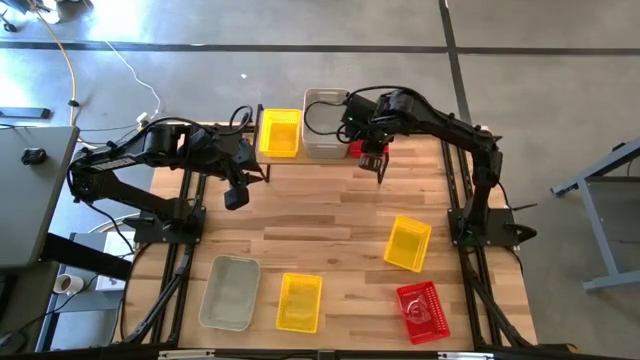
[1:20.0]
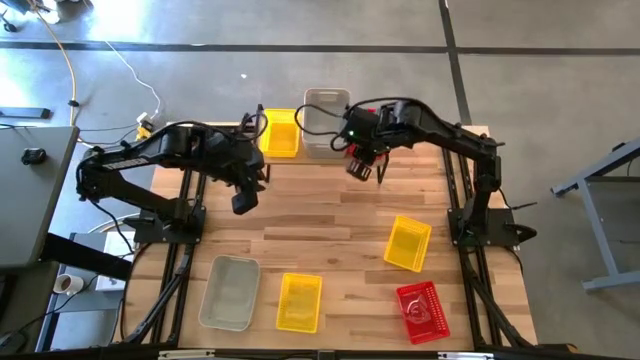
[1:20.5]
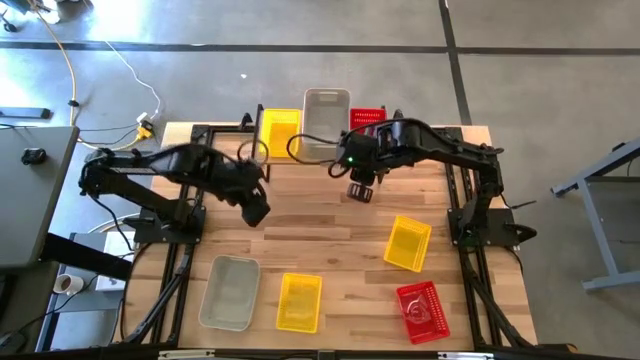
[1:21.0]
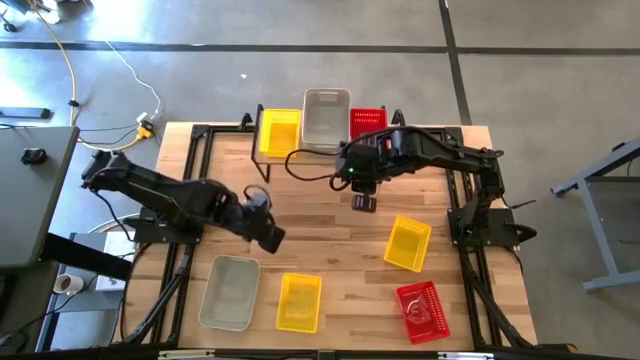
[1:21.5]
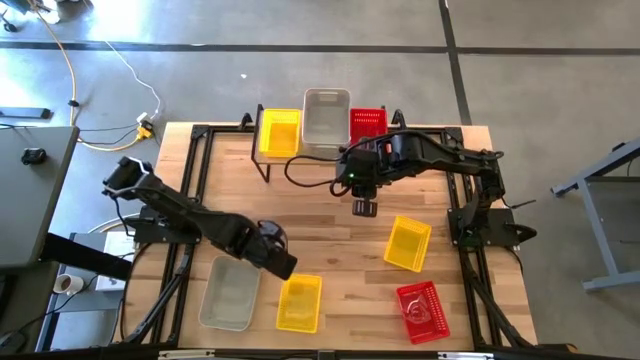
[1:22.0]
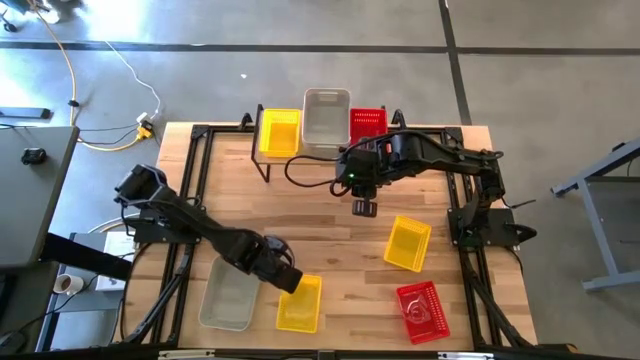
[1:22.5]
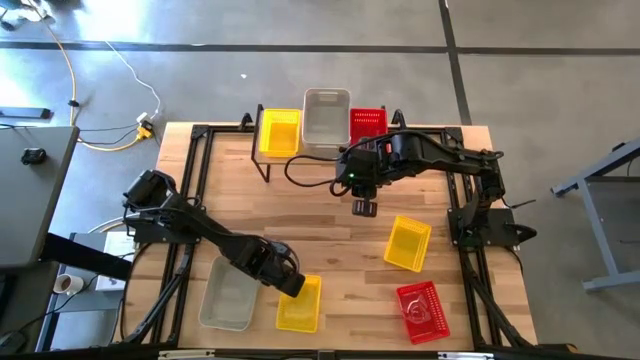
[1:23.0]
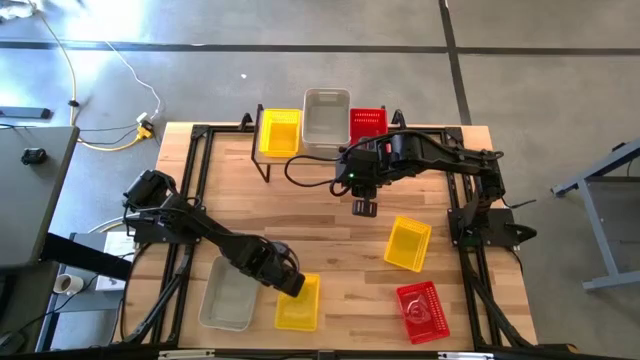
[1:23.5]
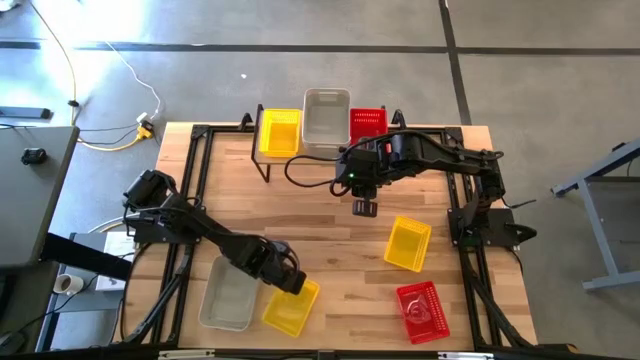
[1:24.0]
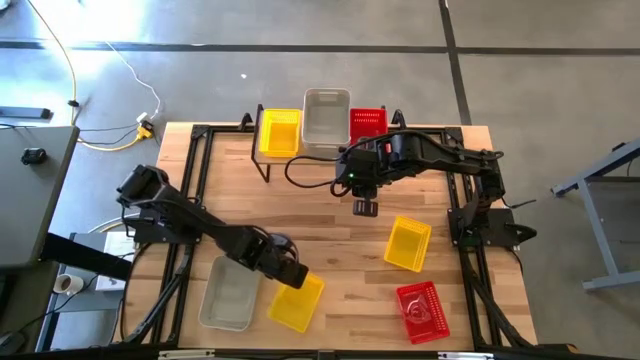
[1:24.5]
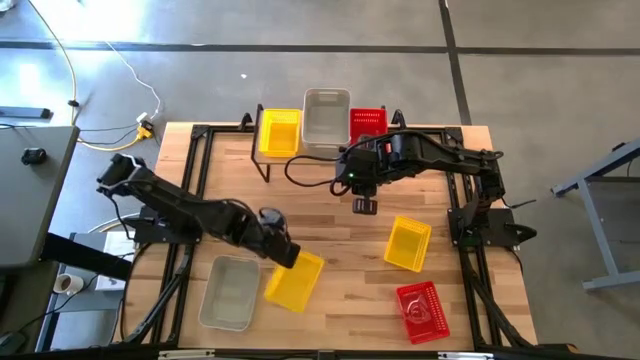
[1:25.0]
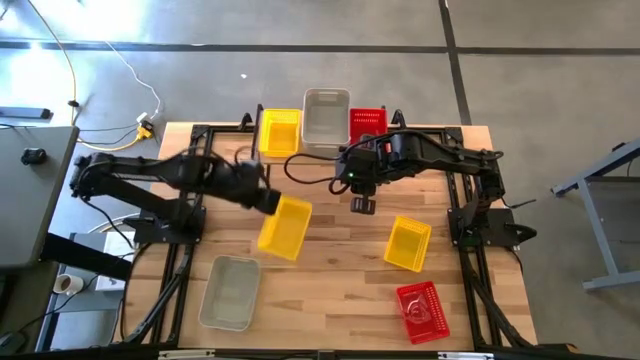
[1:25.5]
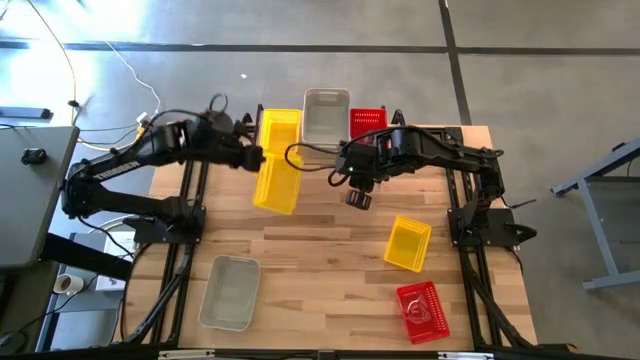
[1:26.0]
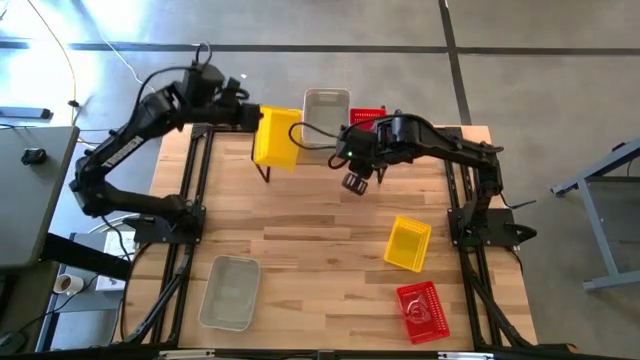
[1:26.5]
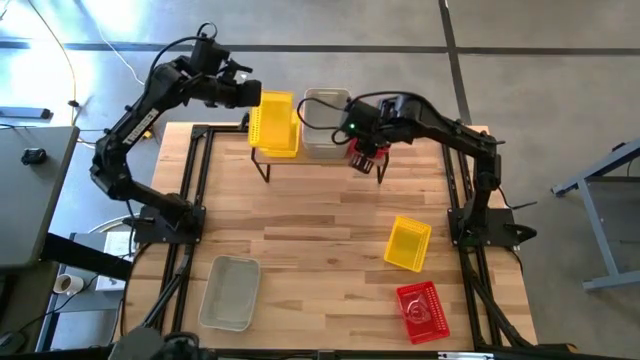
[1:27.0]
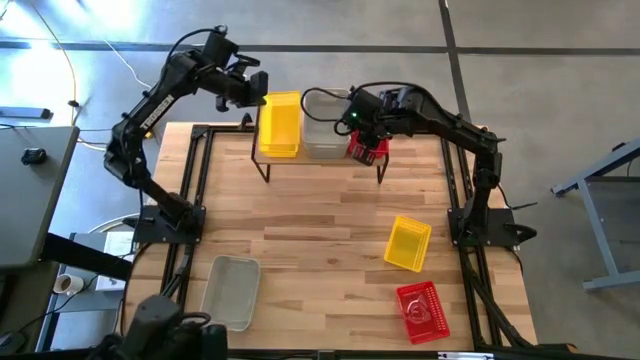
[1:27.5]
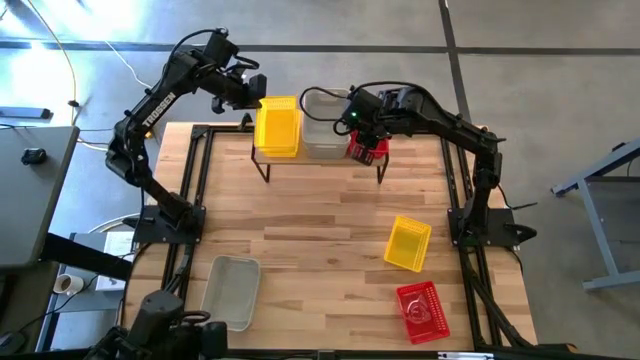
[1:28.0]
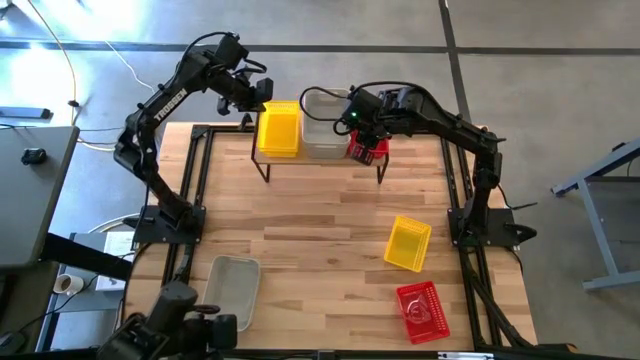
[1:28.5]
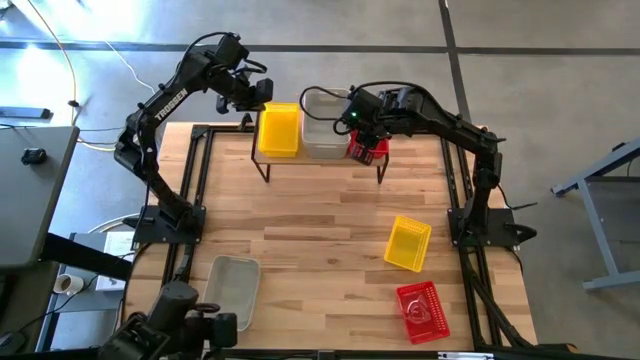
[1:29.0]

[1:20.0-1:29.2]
Task: Stack baskets on shelf by color
Stack the bottom yellow bin on top of the yellow bin on the shelf

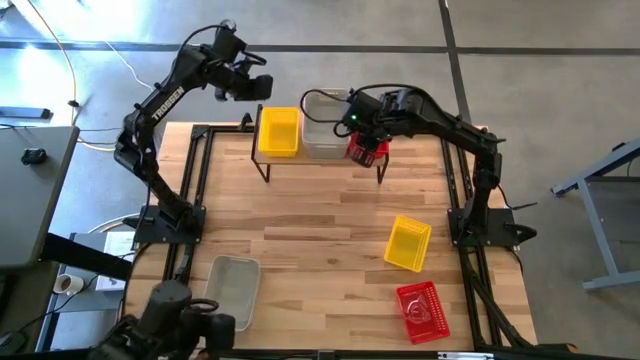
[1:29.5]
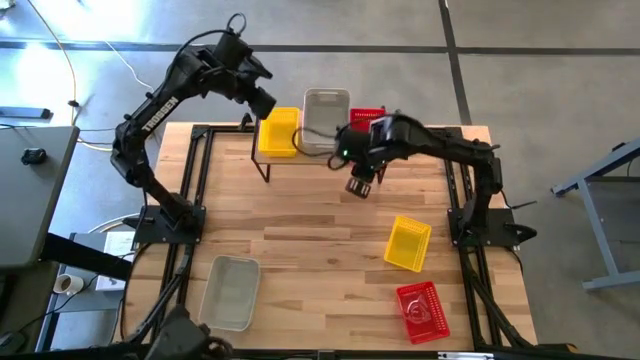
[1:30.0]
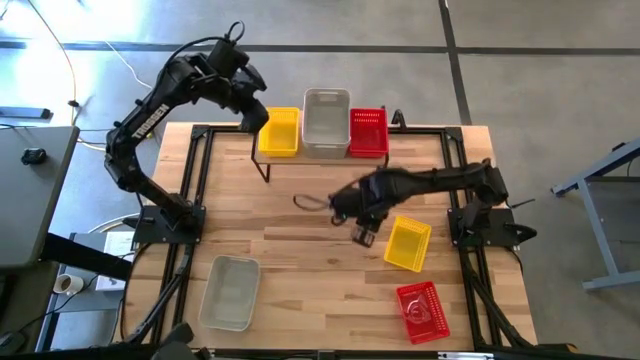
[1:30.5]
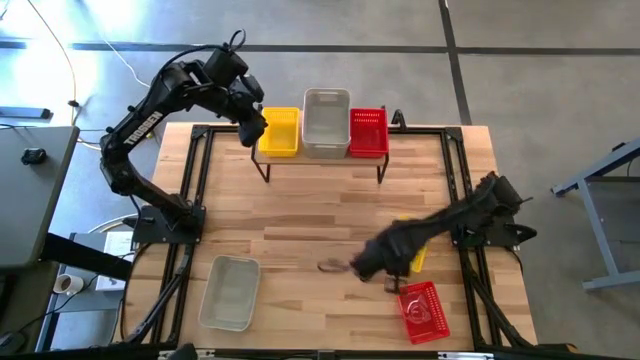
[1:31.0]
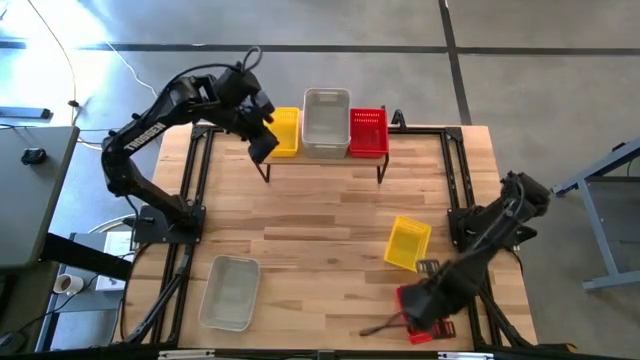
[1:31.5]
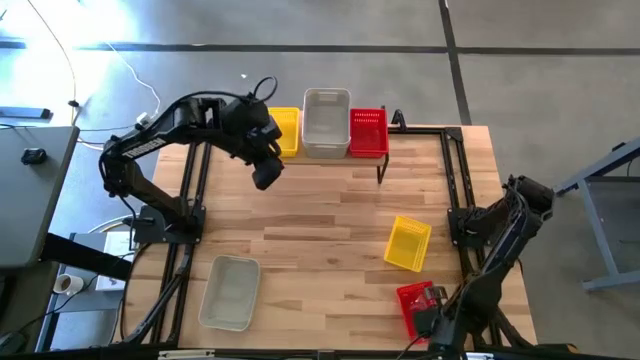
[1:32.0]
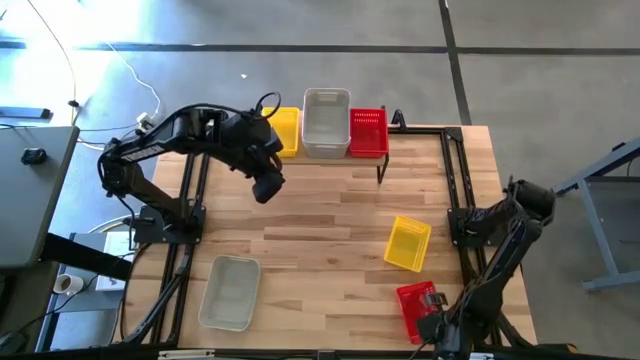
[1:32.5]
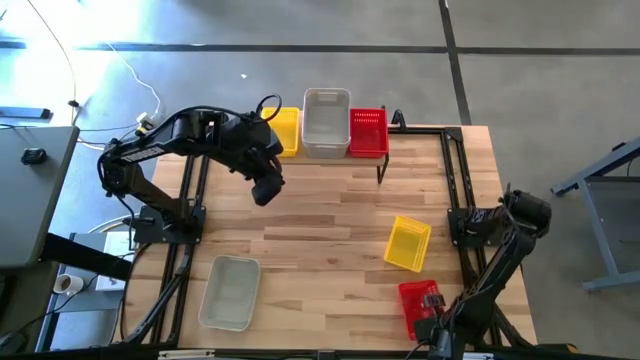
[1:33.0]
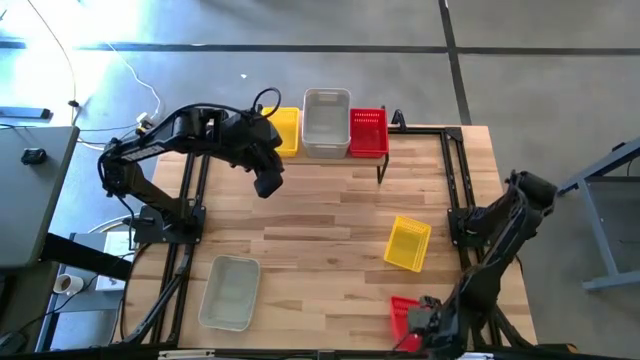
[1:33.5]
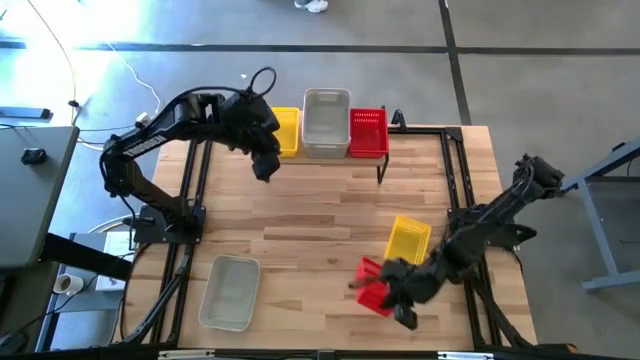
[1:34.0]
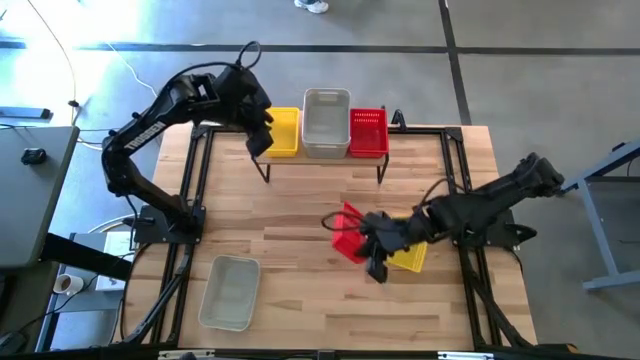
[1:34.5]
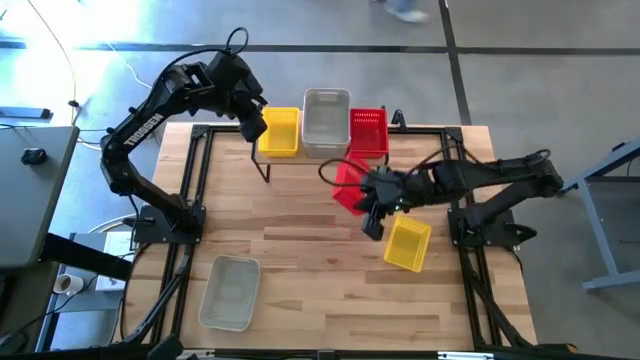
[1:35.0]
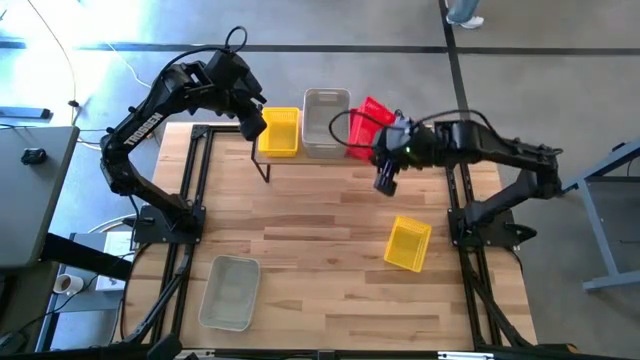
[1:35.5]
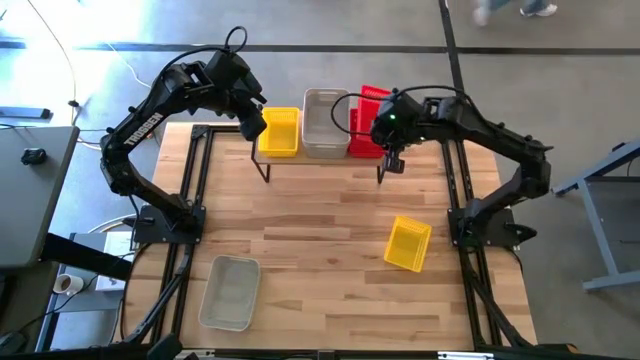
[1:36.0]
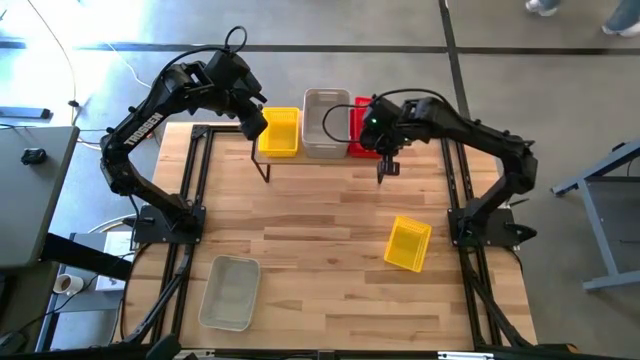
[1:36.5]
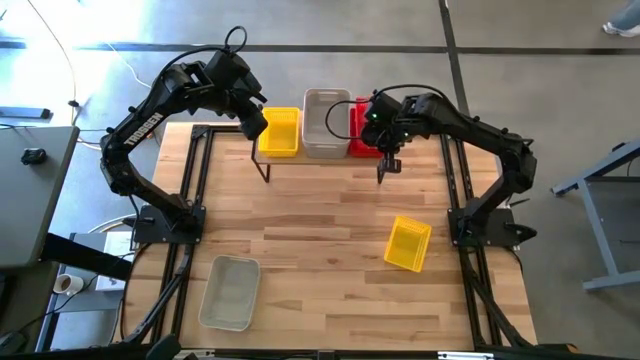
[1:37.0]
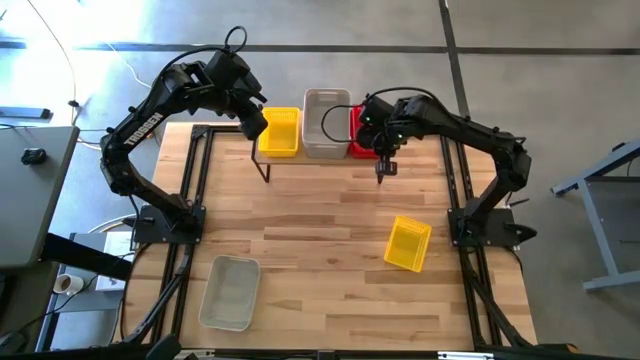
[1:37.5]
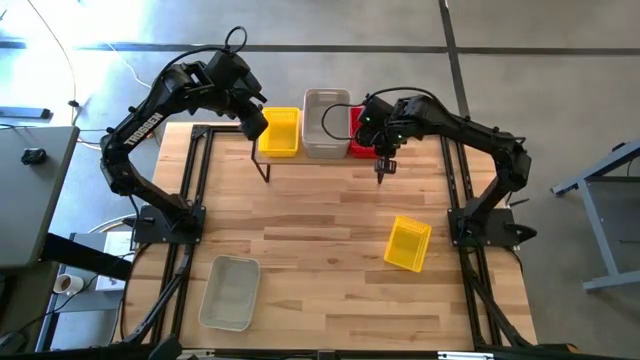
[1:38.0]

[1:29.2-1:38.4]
Stack the red bin on top of the red bins on the shelf

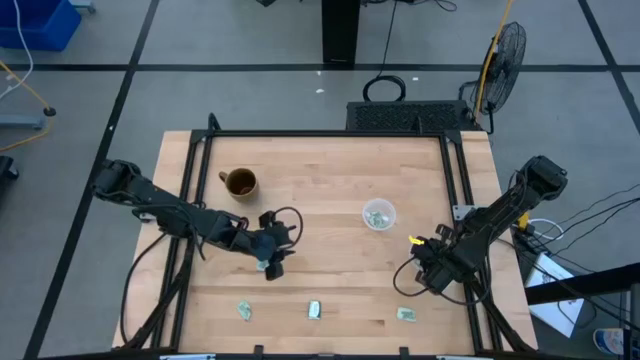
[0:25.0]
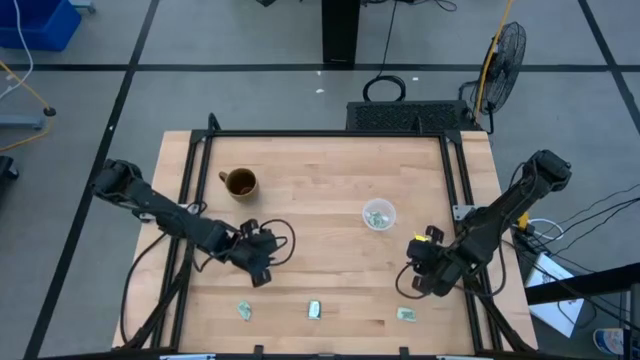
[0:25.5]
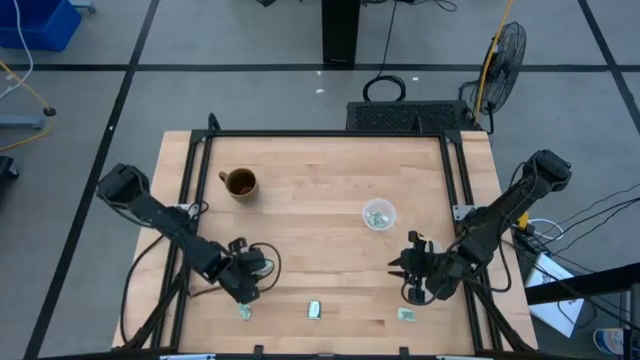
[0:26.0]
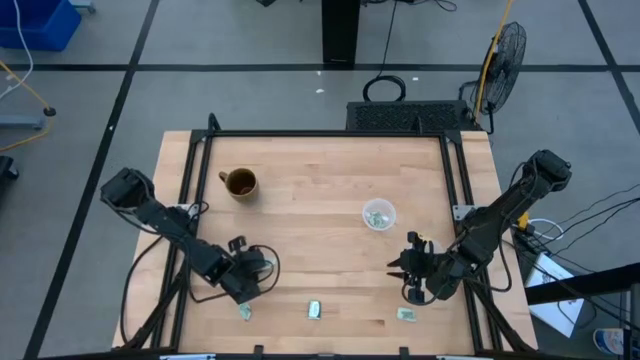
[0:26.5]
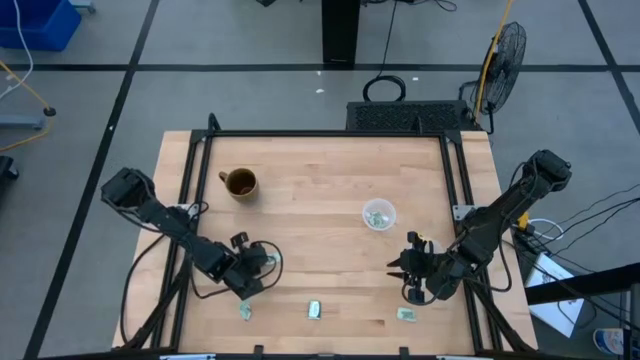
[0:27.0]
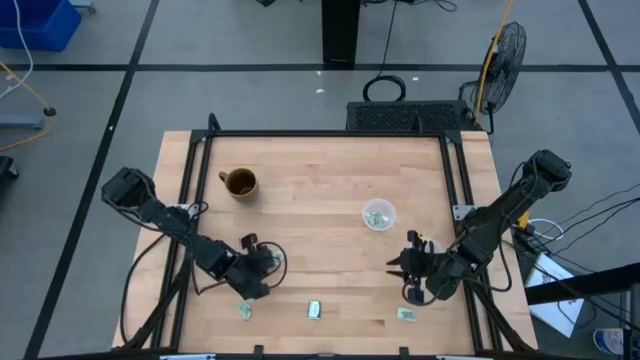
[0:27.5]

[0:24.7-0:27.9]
Task: Pick and place items into bin
Put the white stevia packet into the top transparent bin
